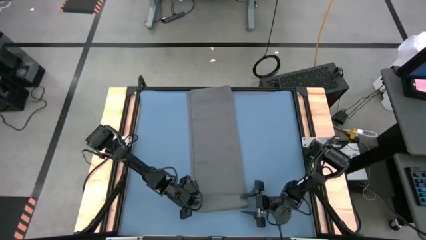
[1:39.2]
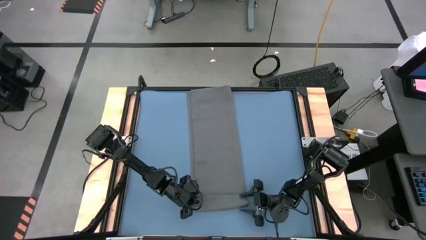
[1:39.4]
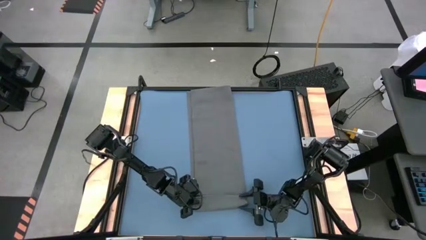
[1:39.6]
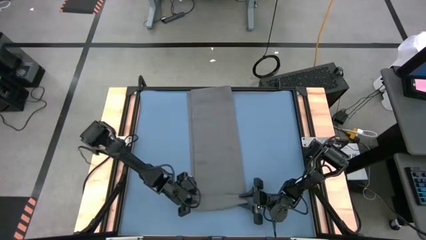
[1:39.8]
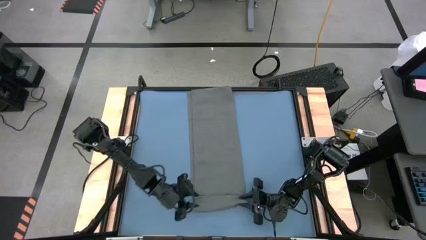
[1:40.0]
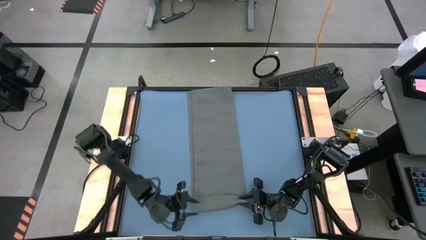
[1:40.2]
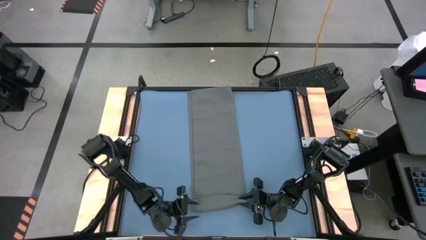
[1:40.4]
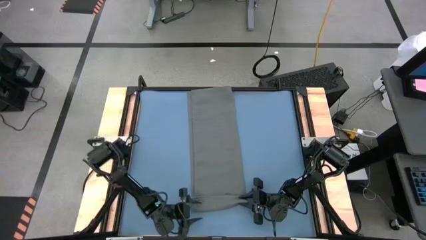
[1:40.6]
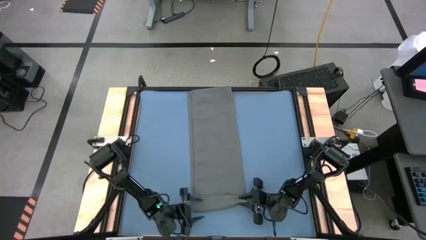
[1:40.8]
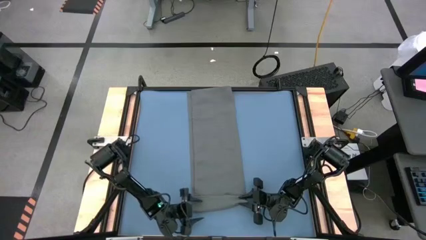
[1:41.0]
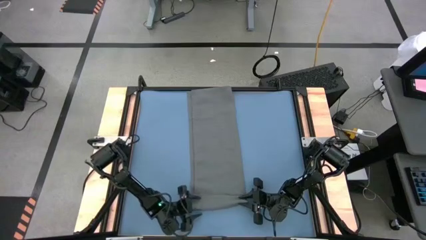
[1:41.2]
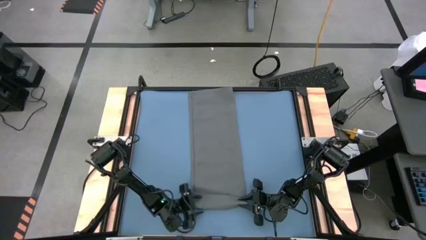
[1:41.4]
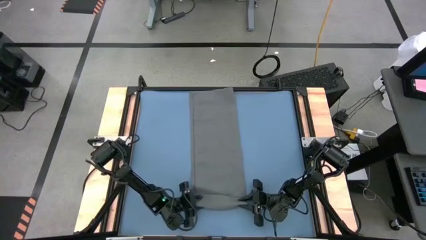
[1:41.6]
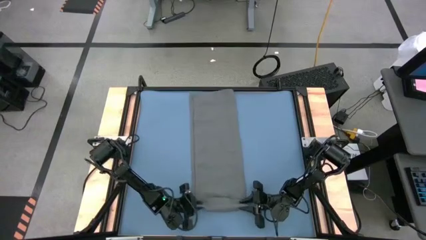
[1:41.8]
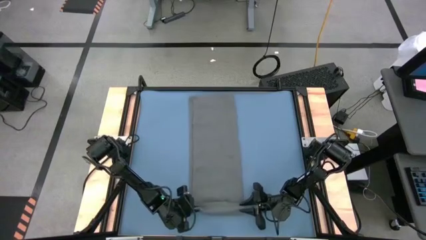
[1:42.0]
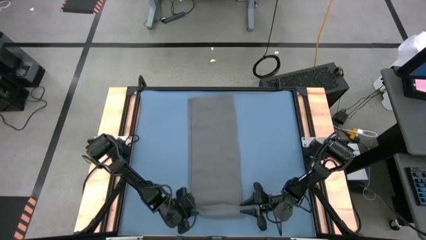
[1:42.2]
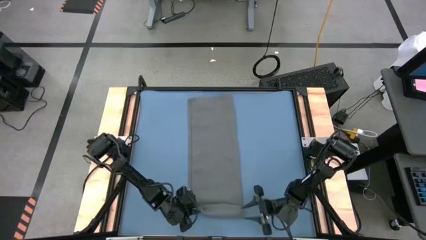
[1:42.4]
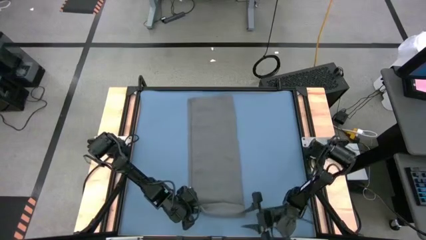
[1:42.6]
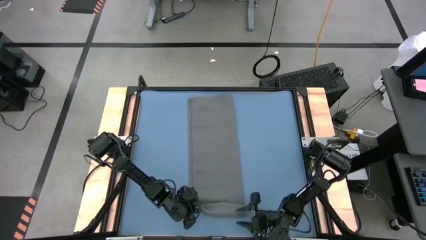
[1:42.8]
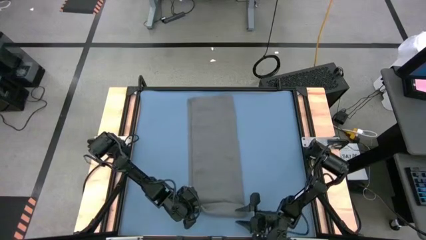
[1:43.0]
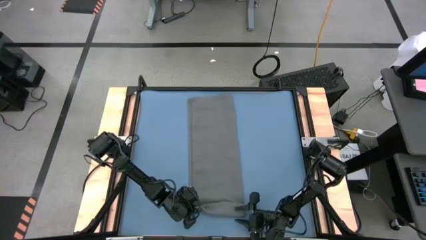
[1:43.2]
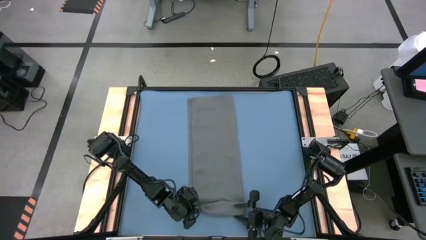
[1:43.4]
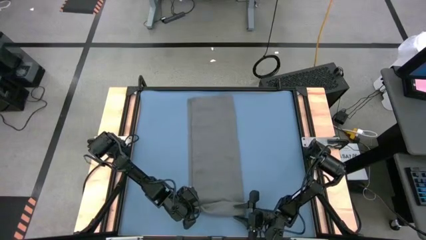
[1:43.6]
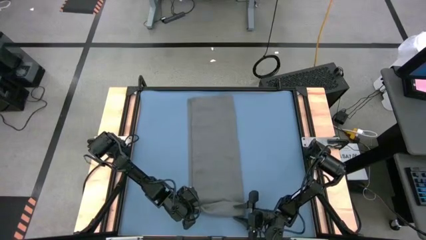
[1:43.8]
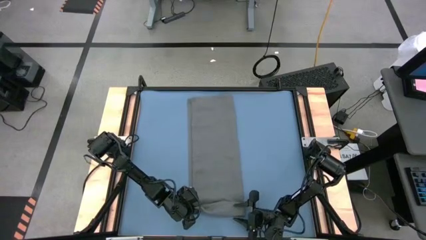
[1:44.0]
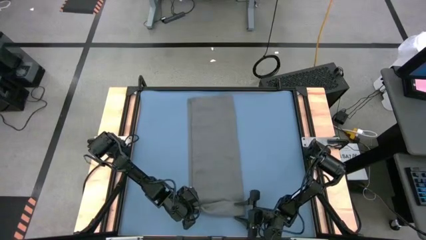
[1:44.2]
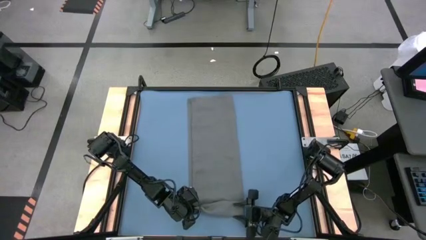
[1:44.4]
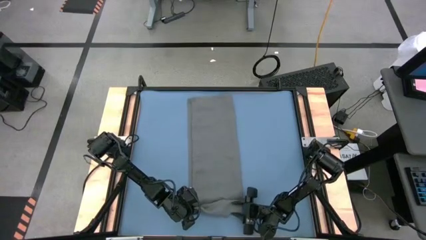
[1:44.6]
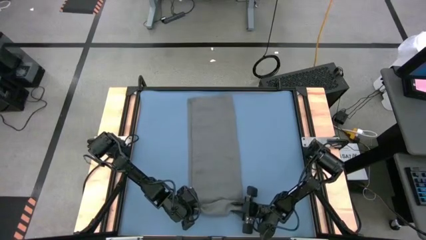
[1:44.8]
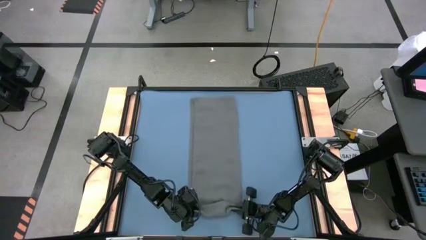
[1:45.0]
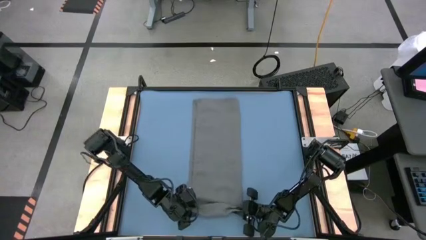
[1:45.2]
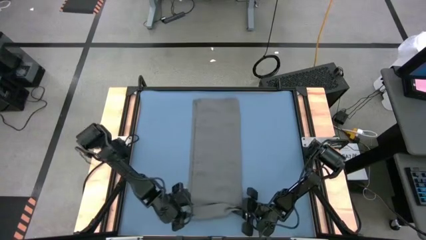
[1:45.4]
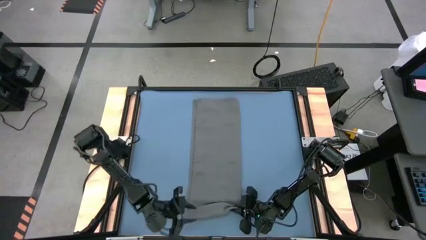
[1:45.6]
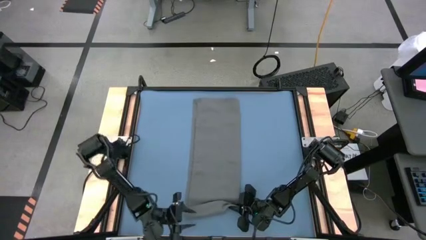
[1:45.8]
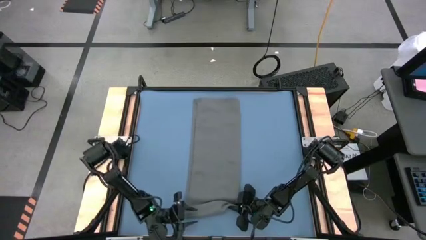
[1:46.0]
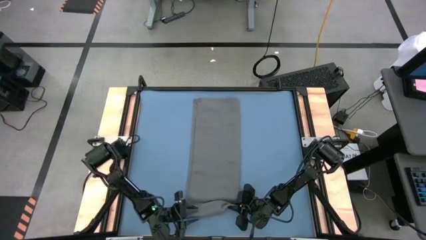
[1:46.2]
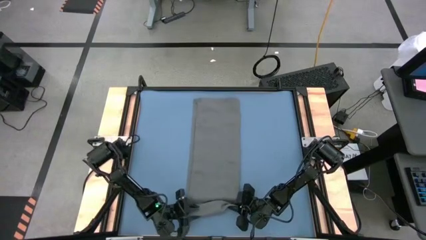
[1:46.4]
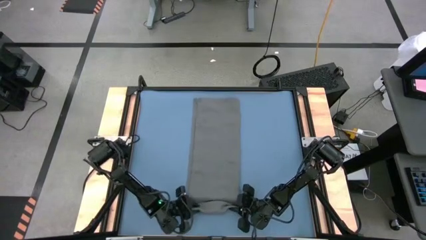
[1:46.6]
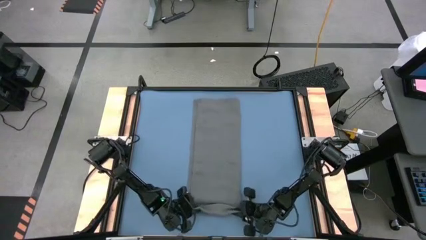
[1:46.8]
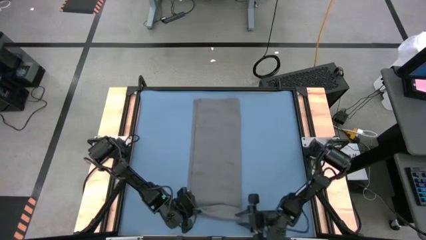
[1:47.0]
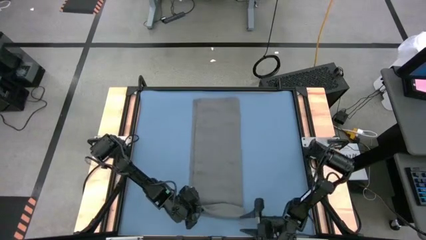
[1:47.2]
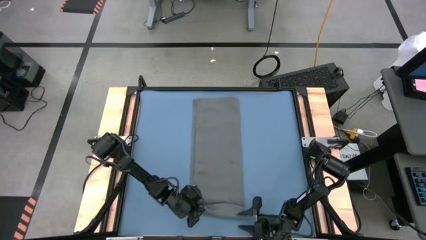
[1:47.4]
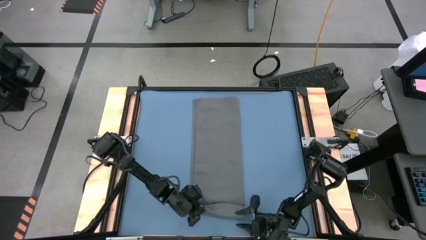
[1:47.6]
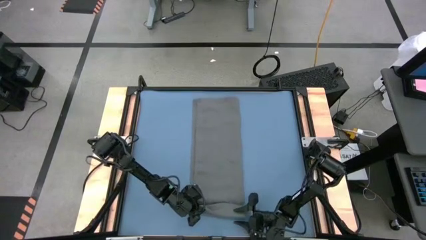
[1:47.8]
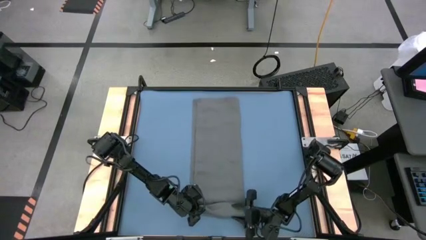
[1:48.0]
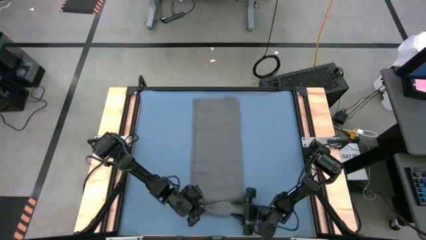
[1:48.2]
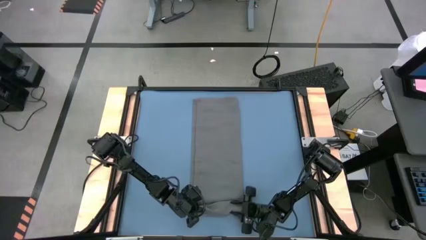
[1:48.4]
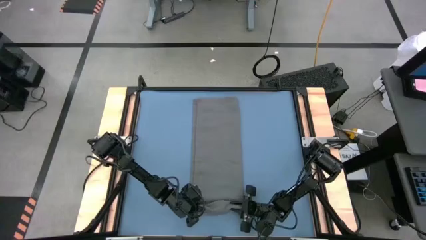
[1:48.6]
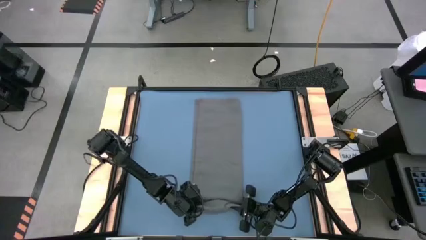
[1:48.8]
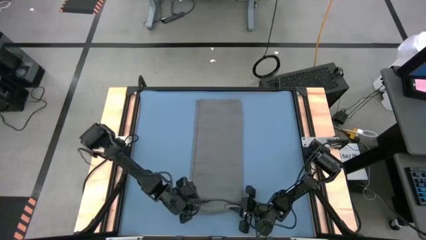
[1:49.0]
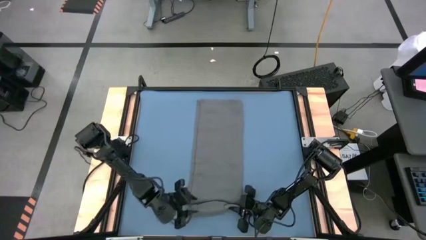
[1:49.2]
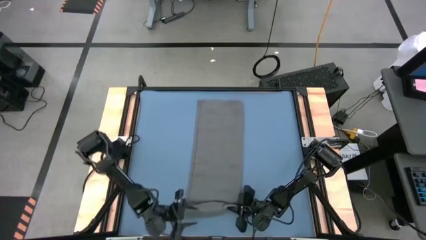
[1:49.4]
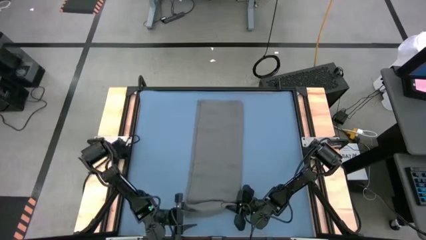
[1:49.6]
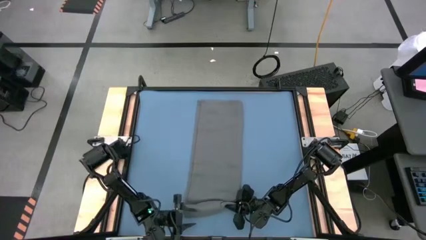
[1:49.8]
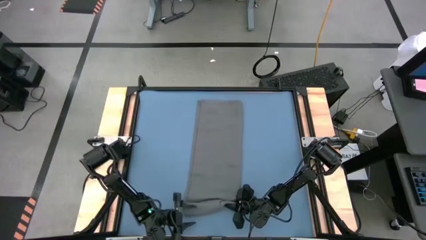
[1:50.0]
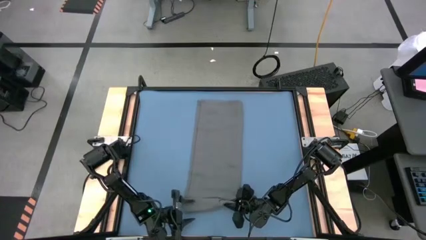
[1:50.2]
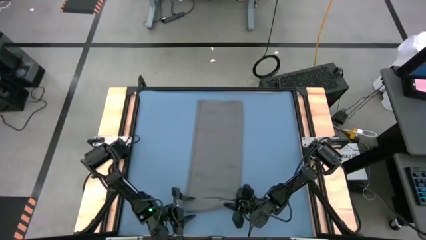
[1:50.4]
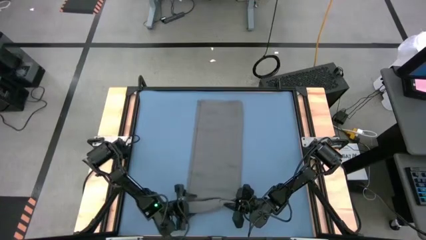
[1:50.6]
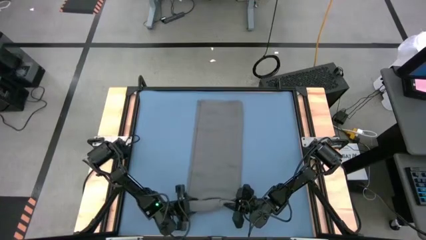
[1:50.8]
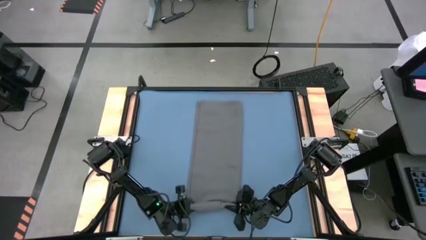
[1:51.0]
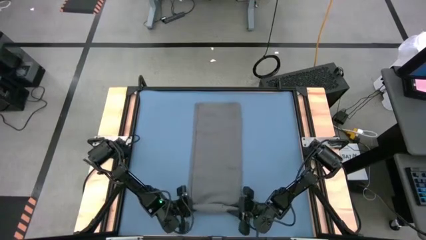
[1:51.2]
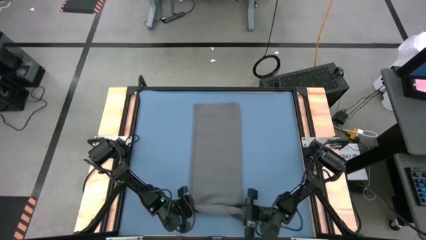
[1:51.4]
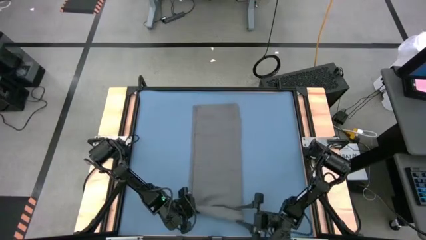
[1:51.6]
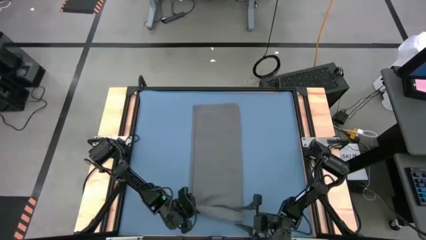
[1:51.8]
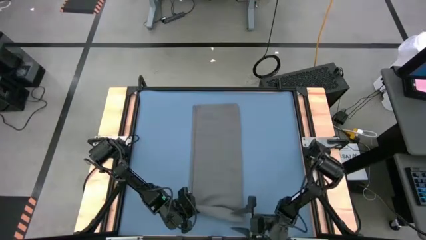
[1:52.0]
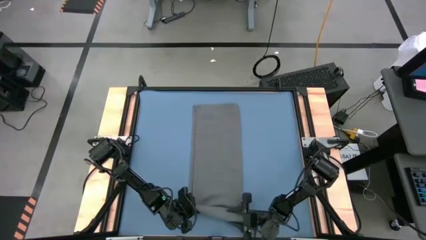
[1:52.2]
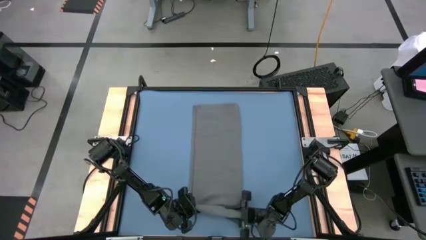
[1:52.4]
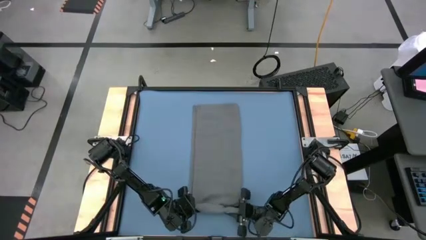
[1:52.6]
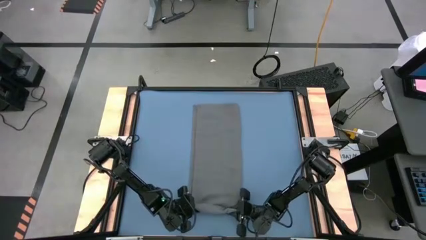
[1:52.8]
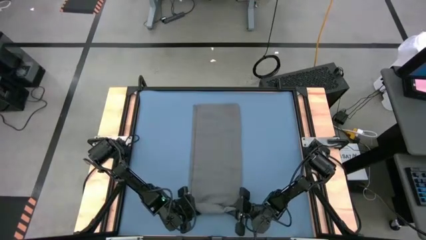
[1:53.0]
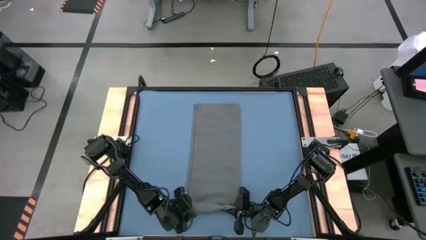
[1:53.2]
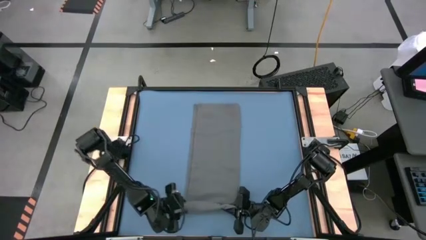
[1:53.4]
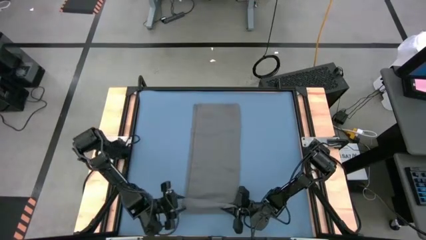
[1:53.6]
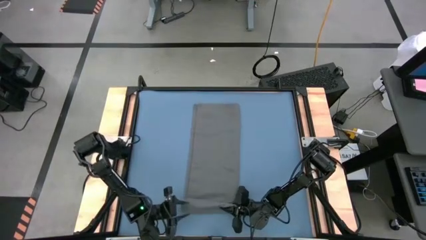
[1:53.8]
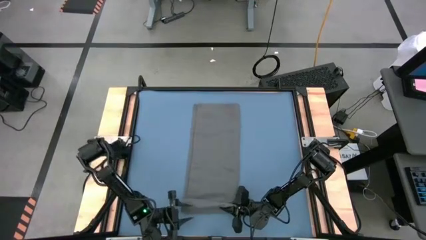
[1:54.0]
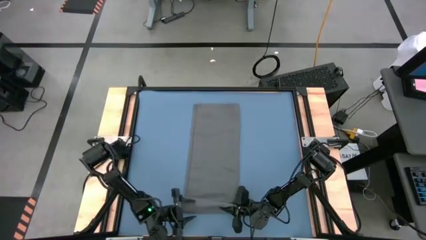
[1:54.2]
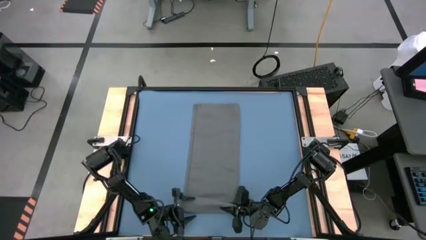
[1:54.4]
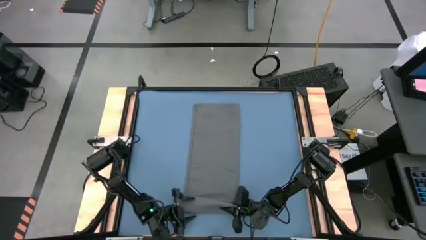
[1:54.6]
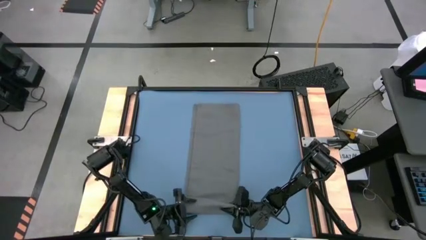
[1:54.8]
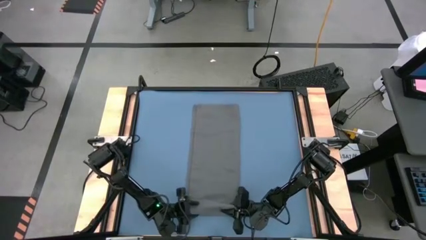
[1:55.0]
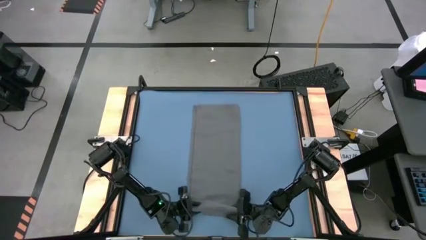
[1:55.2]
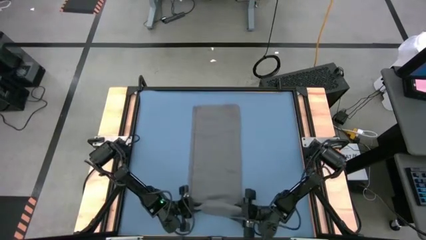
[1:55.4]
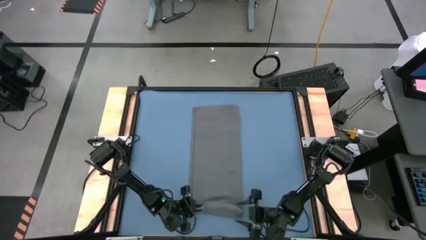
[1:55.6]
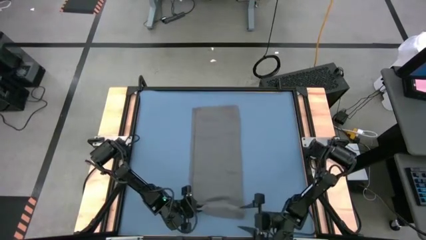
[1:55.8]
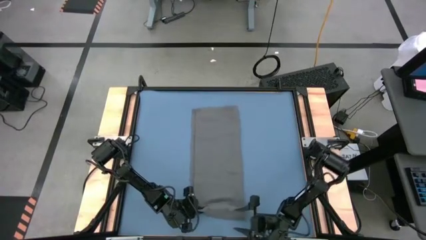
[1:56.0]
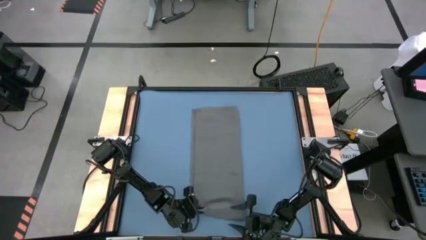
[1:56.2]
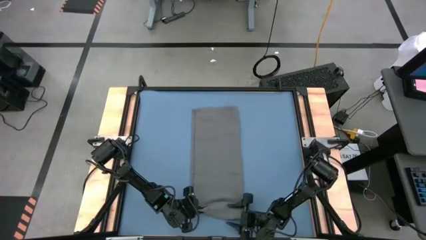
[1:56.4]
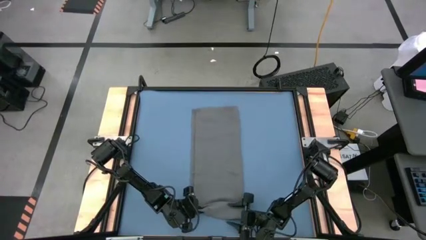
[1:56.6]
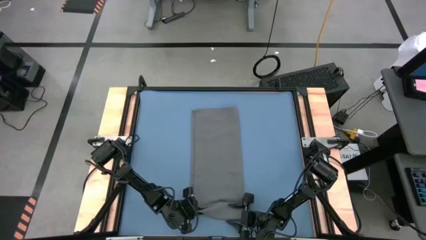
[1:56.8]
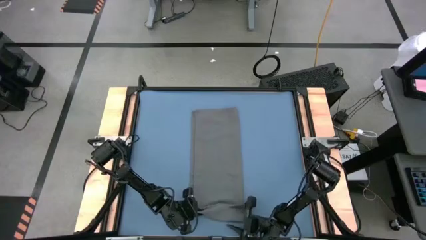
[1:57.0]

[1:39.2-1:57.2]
Task: Roll towel
Roll the gray towel
